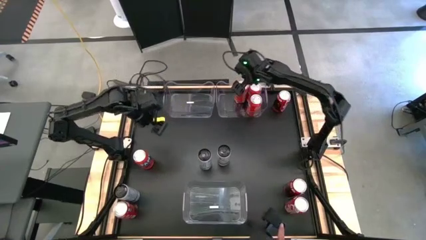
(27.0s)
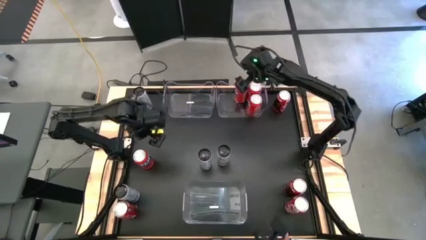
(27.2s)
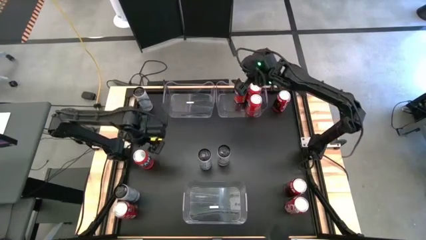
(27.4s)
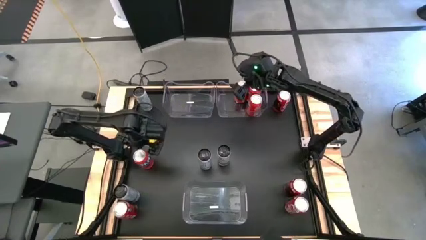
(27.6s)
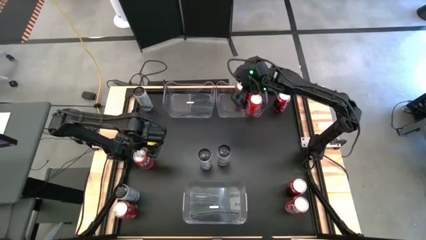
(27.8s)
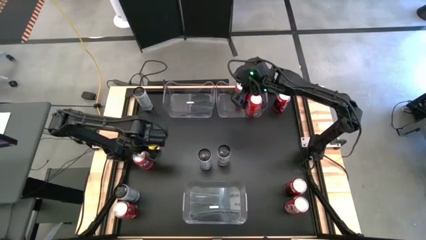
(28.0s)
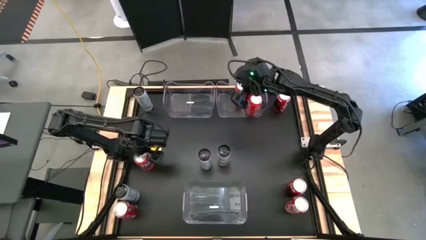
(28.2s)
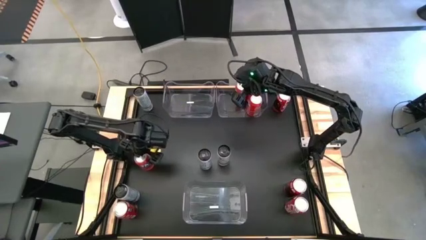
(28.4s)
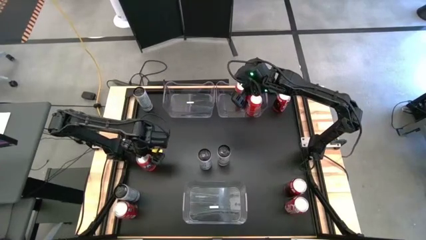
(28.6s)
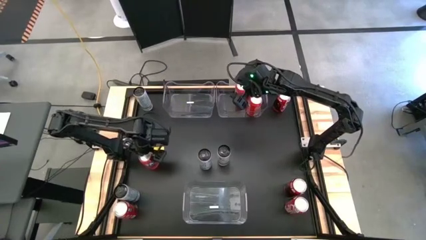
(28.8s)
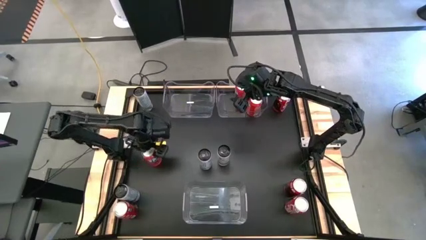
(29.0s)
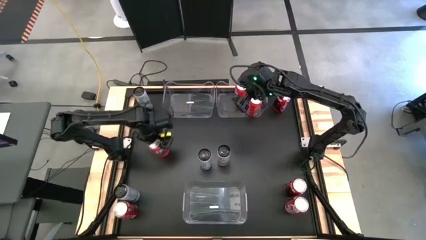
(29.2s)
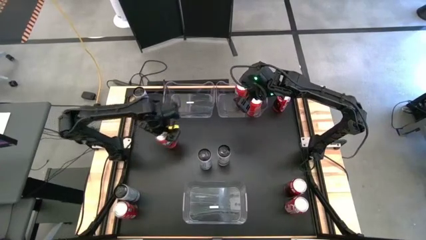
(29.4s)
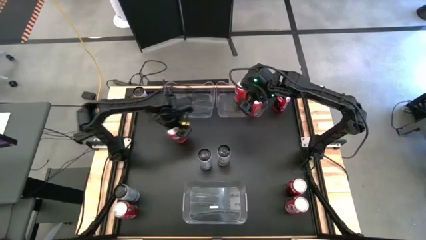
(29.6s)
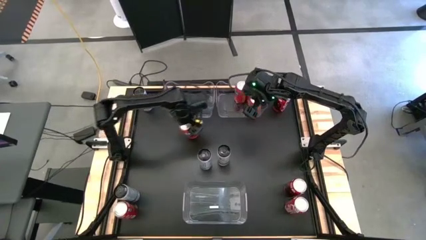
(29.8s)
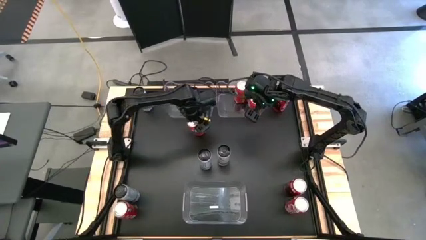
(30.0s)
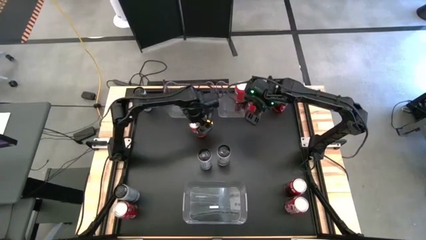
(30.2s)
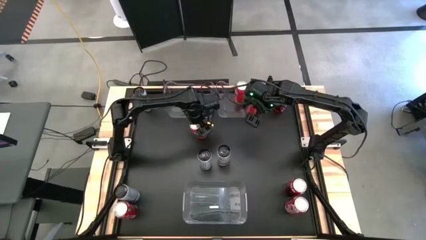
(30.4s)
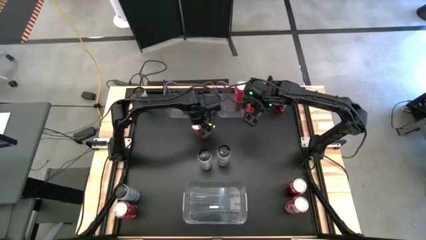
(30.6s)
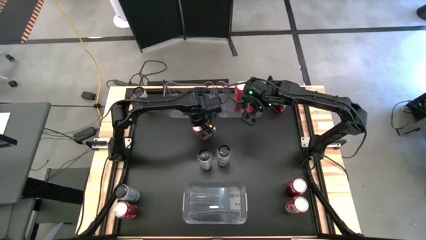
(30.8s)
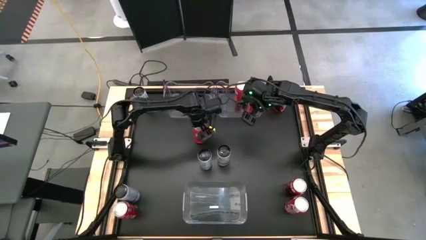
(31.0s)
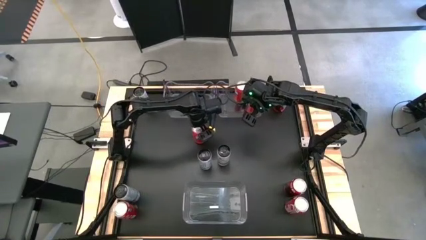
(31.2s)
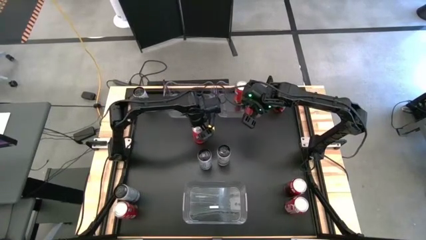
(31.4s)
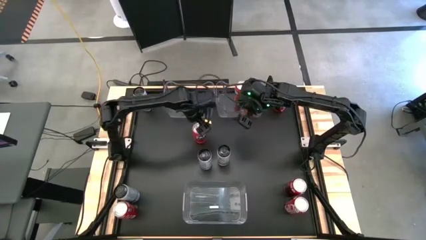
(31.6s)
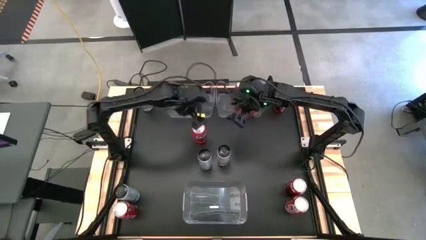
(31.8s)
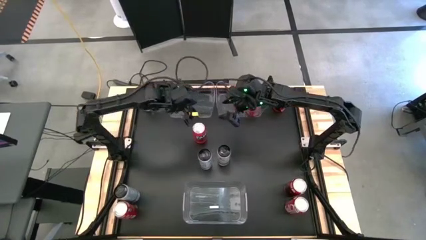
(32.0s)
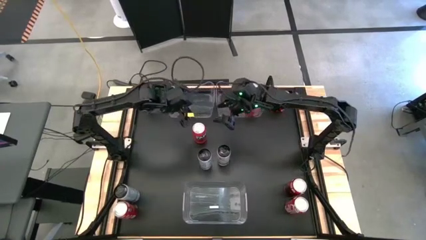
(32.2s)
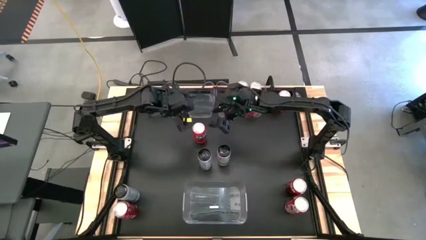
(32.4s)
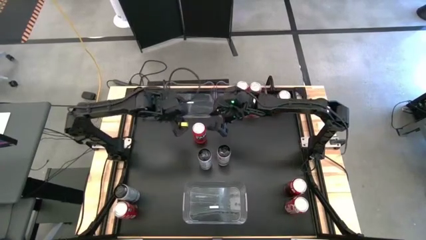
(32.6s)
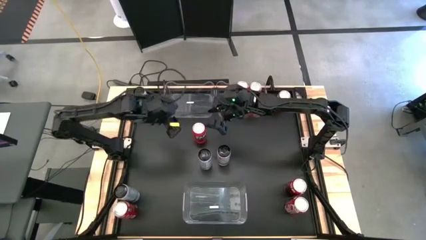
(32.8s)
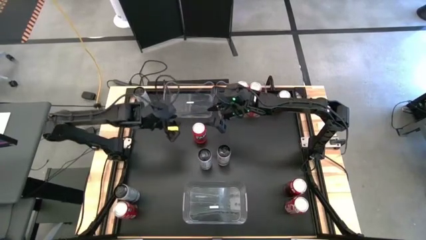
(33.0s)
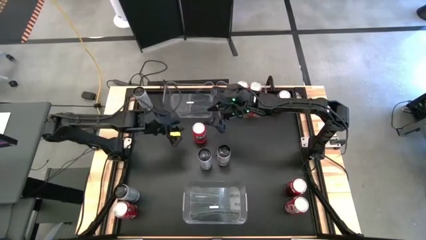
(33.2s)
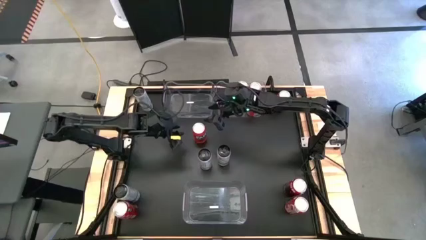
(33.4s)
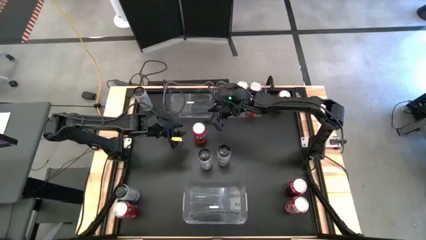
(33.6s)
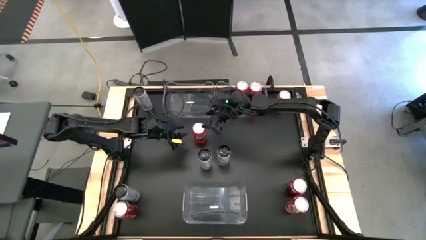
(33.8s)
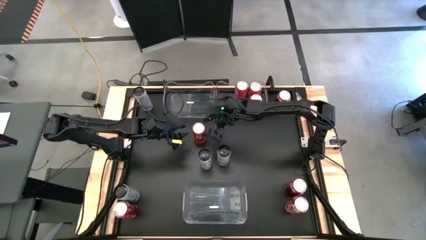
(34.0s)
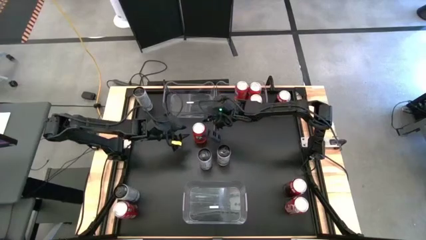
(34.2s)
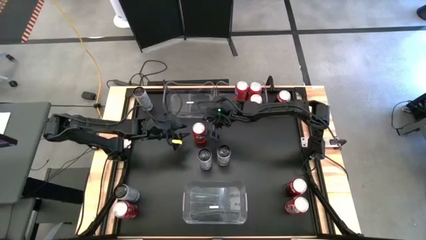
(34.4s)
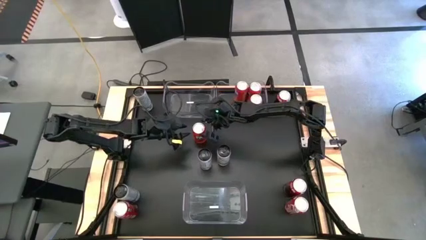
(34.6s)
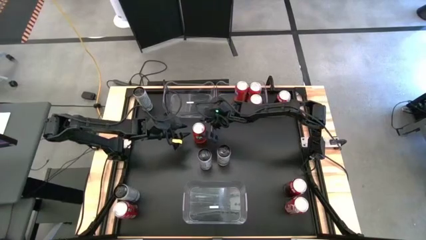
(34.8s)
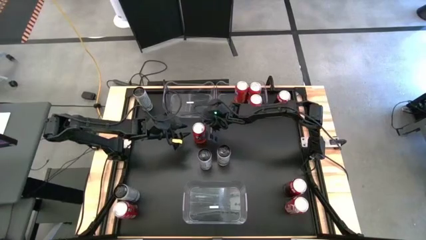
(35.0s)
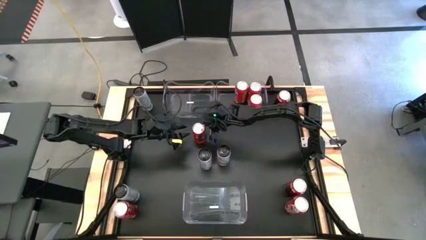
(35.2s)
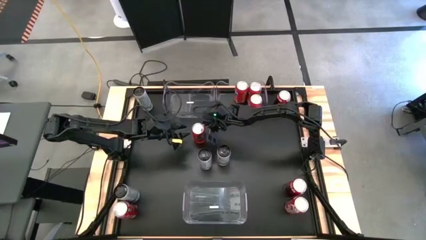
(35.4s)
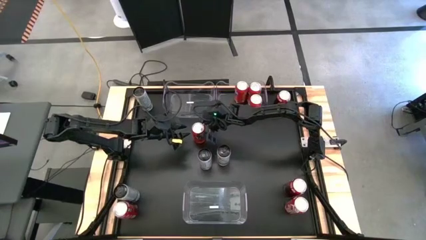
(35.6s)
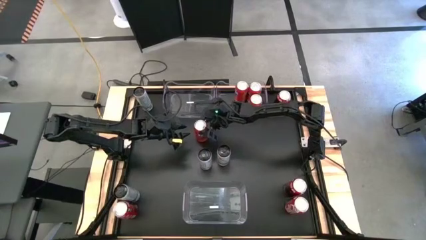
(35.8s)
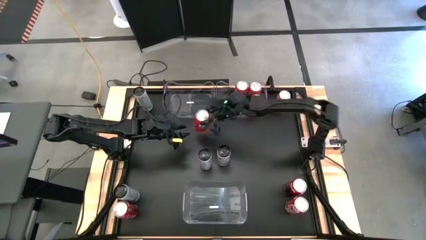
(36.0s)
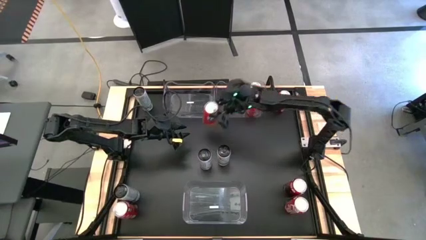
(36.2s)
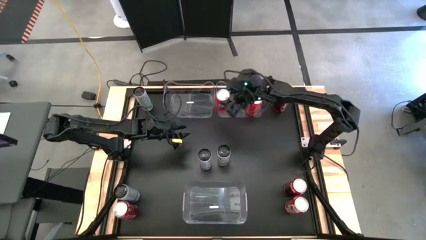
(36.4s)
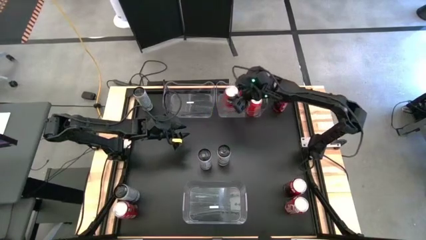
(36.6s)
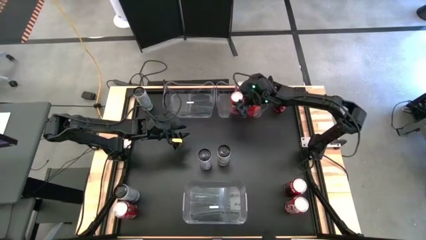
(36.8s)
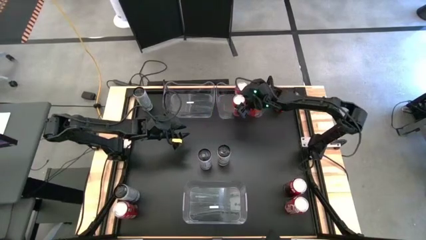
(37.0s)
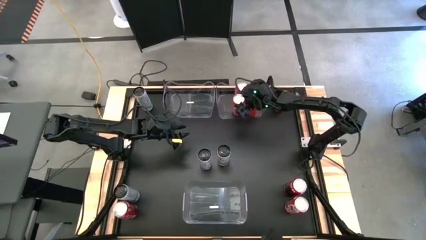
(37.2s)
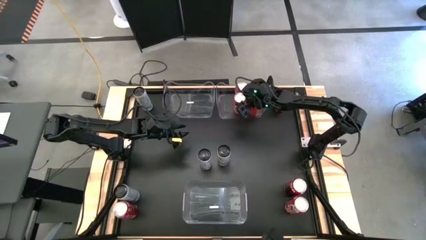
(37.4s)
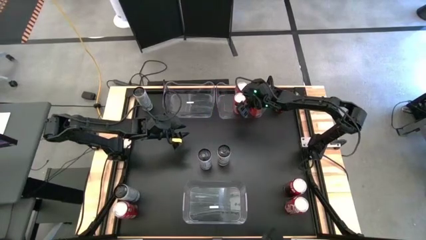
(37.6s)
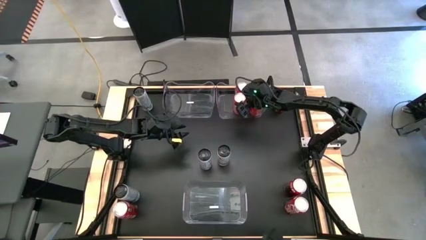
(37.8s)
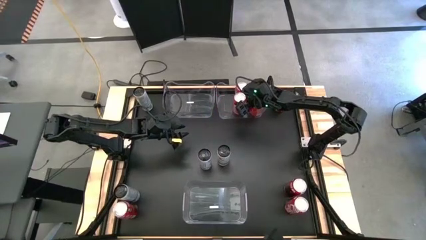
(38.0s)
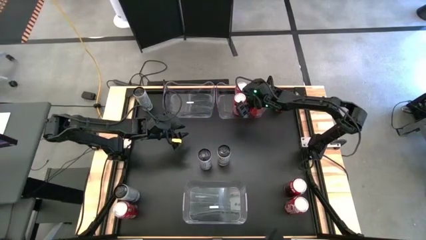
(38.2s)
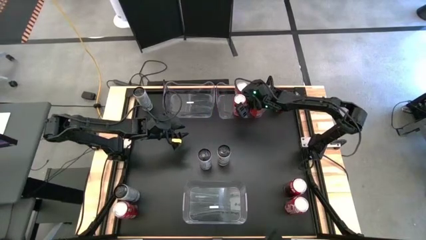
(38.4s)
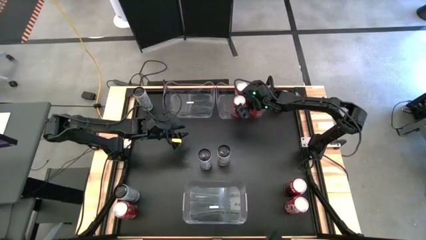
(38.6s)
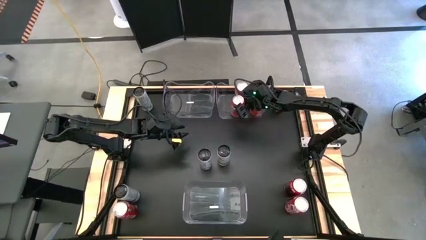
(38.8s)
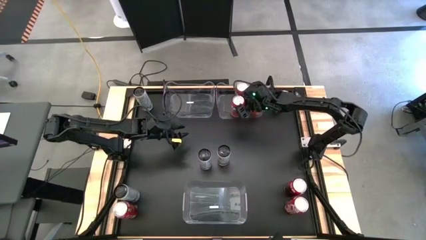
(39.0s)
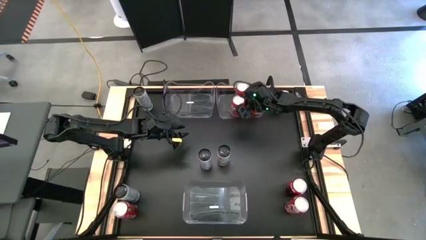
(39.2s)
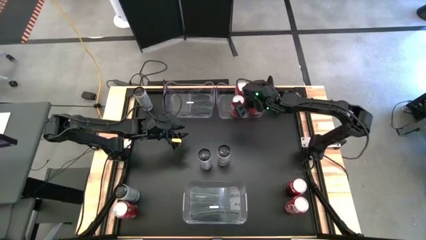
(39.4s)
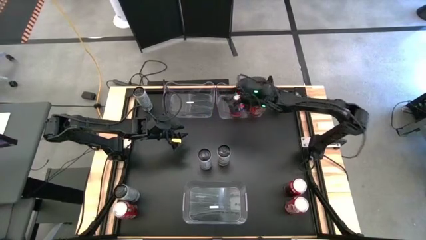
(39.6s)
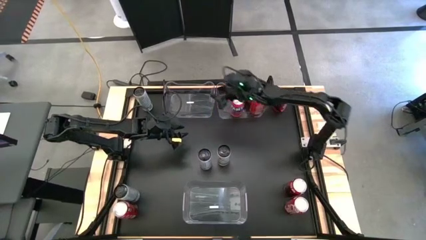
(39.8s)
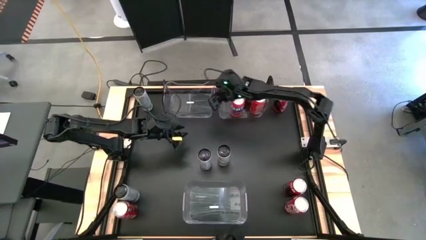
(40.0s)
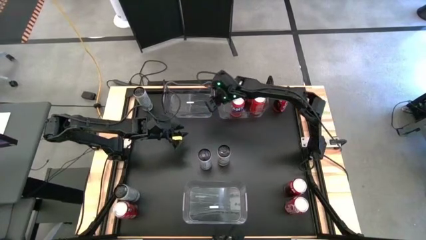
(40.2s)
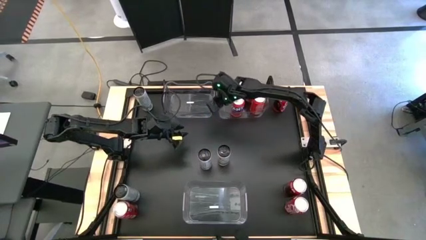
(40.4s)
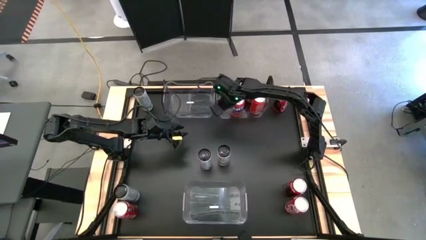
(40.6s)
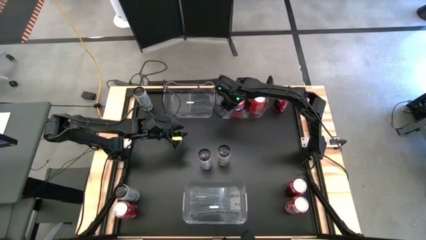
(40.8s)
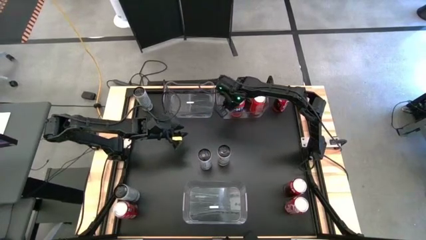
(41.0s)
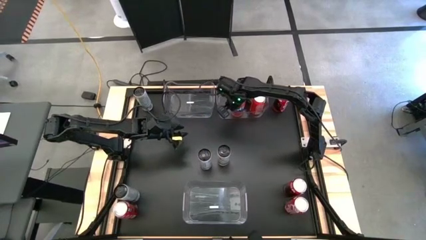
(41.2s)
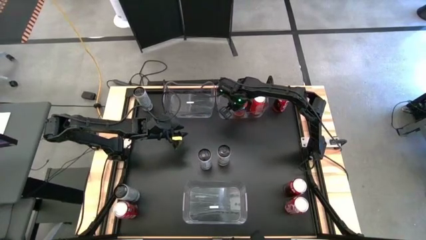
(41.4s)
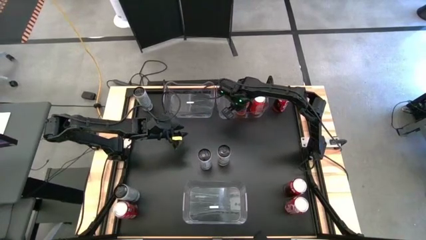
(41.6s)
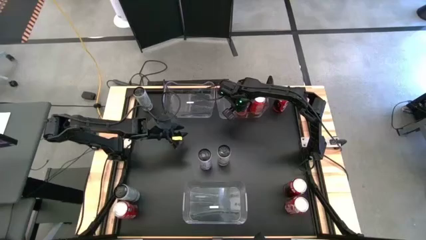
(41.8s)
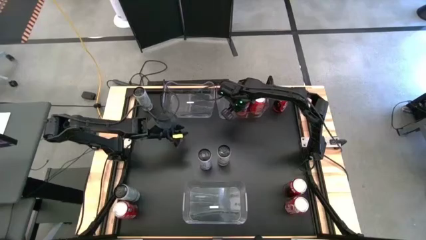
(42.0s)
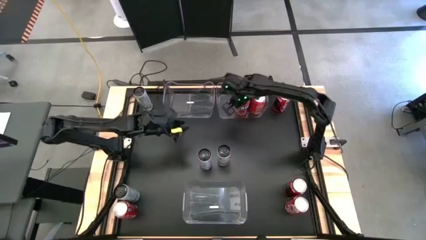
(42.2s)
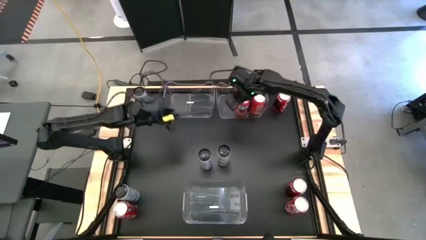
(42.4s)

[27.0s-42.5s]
Task: Sort soda cans
Put the orange soda can into the top right transparent bin
